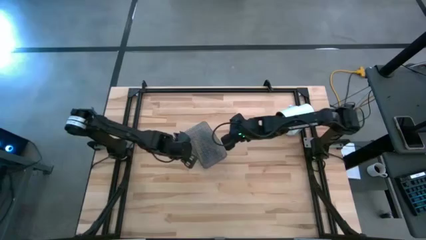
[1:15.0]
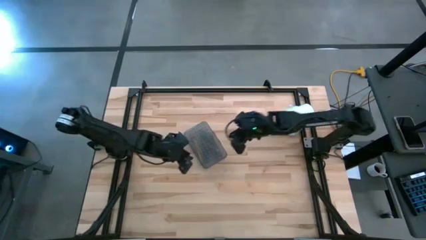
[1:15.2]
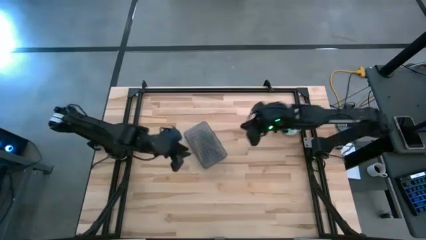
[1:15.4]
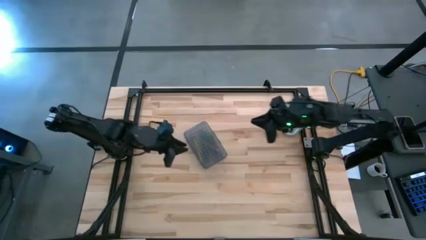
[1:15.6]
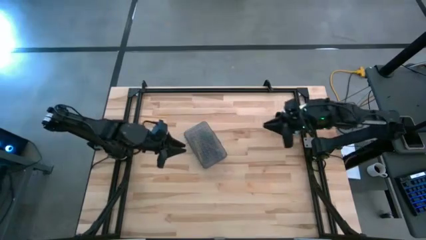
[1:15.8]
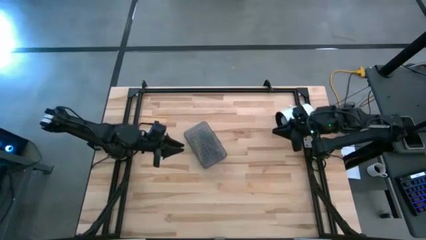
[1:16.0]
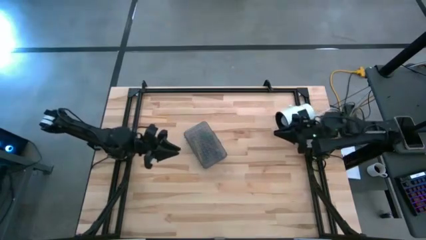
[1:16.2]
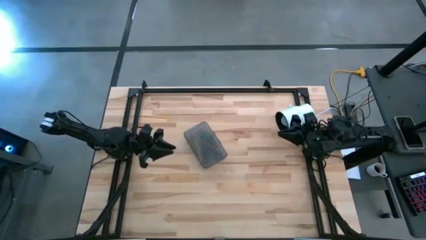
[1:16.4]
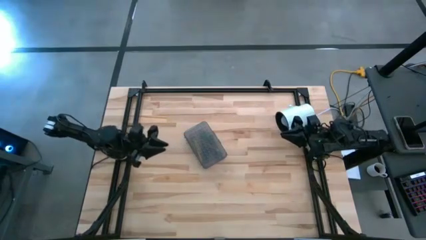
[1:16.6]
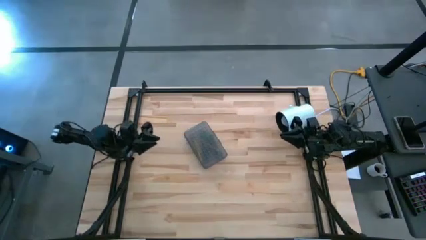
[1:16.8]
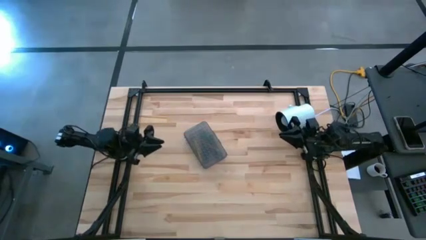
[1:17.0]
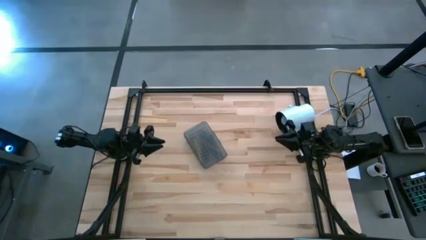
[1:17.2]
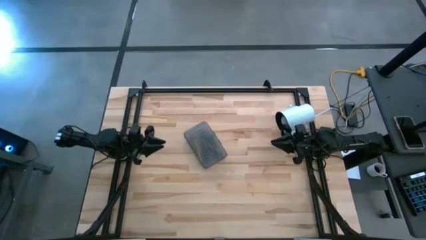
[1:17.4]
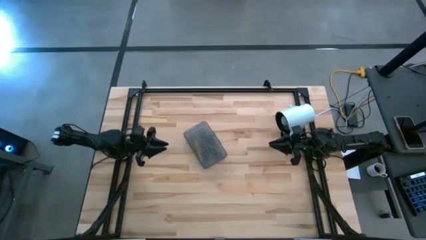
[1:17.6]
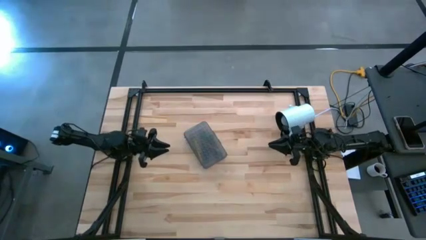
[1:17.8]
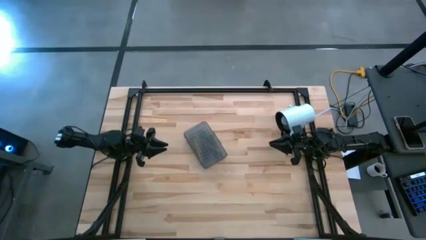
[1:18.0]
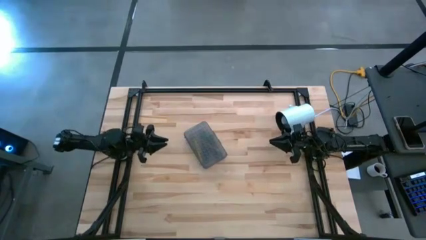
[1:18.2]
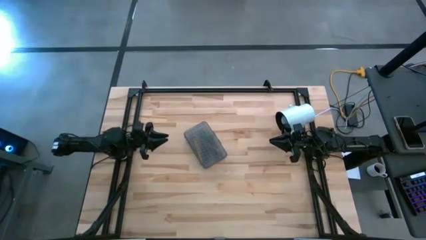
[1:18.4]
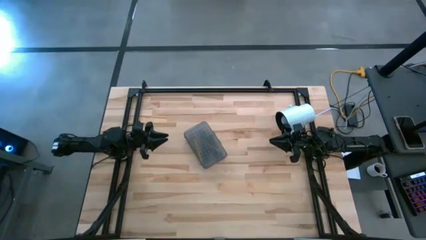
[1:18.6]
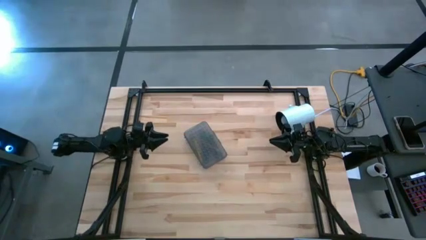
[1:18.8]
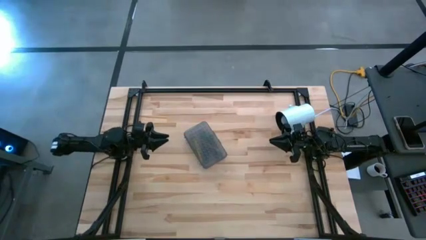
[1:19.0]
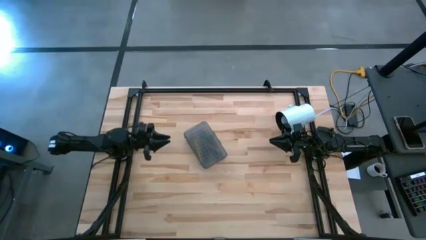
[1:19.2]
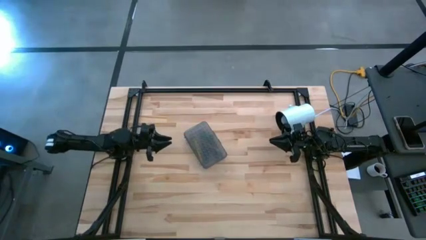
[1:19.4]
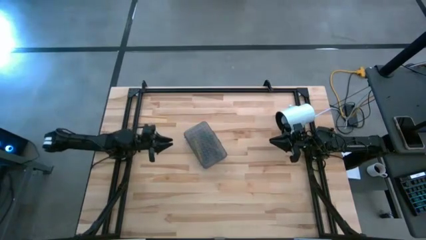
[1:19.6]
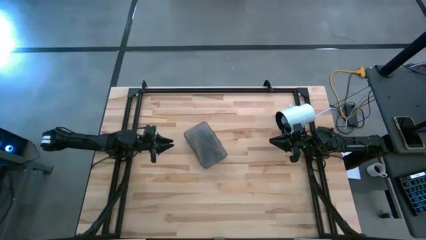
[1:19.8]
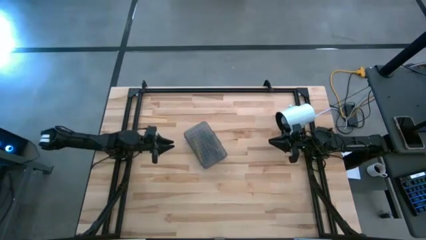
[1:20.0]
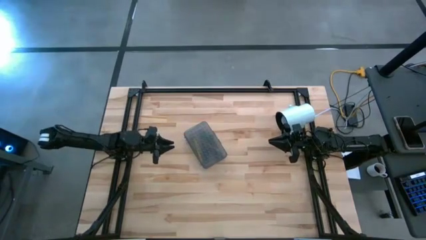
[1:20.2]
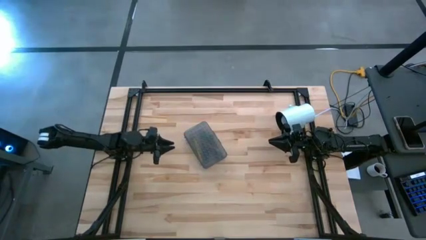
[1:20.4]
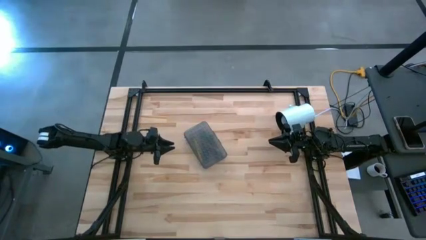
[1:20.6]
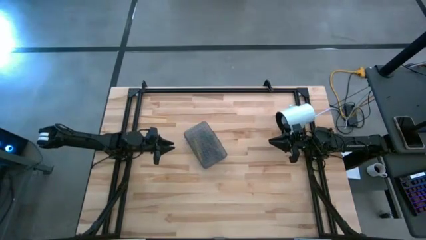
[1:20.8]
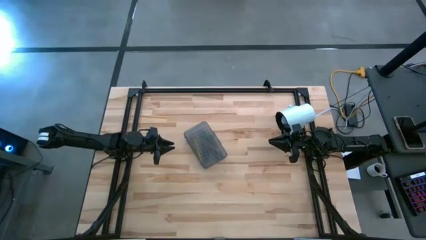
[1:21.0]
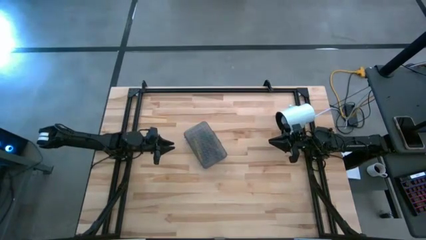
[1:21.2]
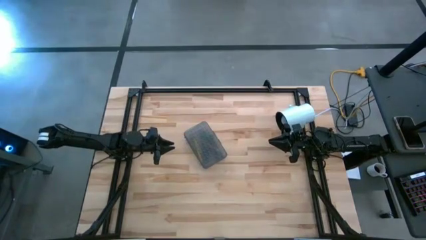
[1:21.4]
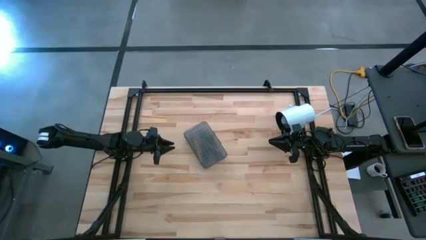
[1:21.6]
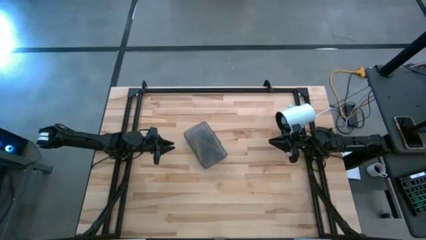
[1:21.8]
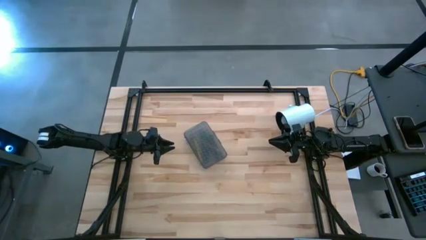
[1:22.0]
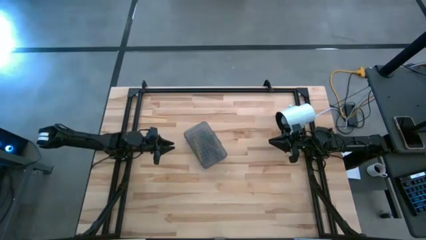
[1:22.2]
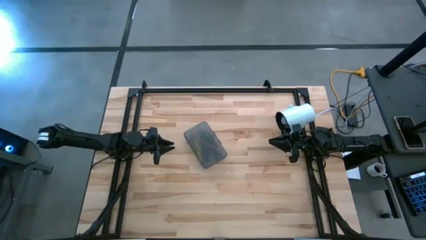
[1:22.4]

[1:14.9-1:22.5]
Task: Pick & place school supplies into a supply box
Return to Home Position

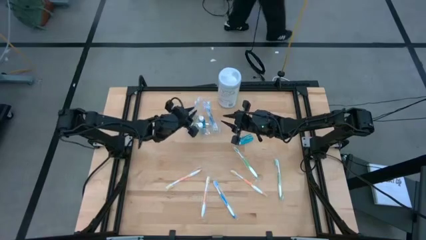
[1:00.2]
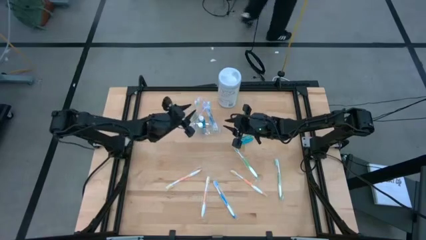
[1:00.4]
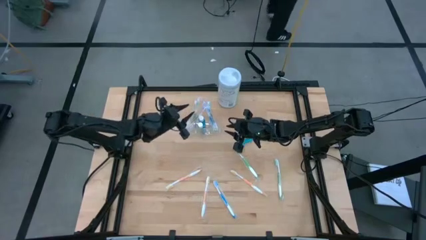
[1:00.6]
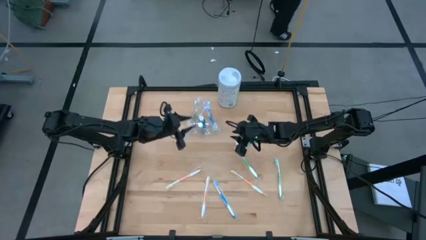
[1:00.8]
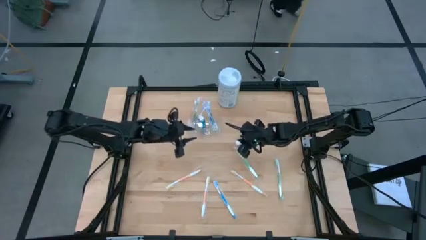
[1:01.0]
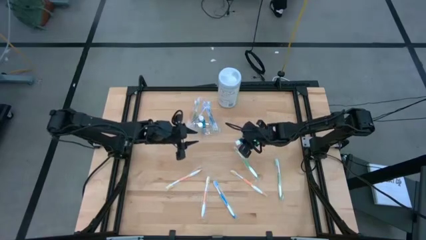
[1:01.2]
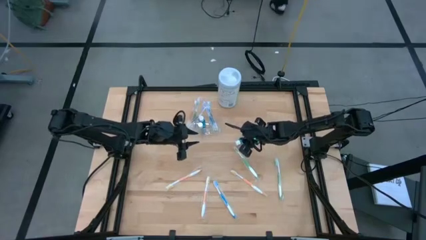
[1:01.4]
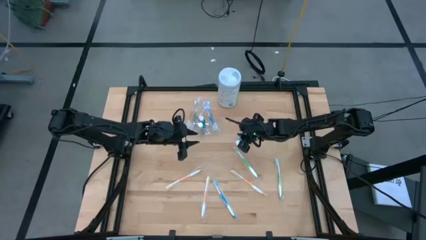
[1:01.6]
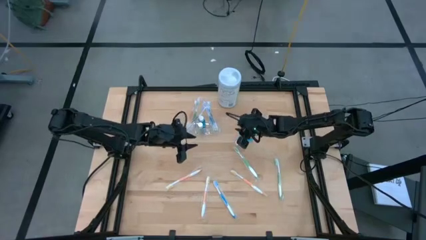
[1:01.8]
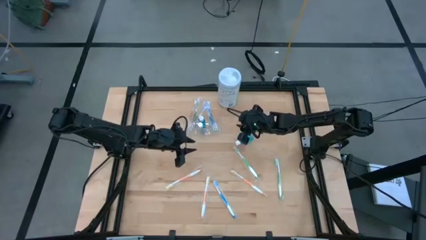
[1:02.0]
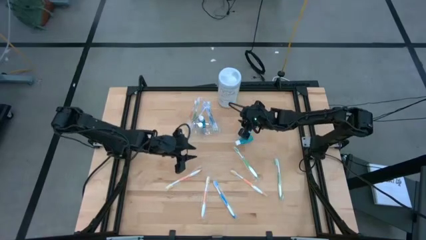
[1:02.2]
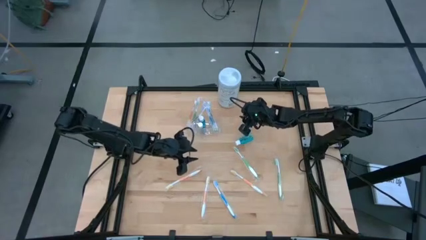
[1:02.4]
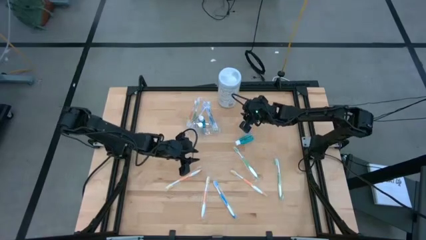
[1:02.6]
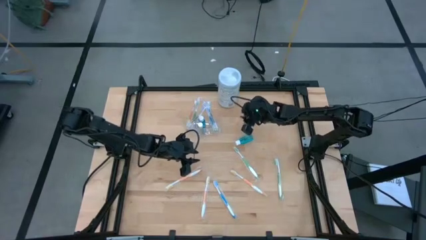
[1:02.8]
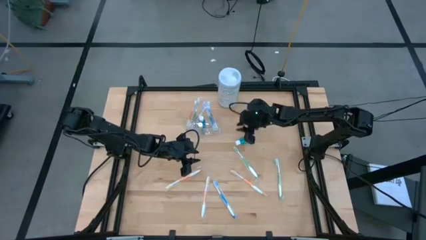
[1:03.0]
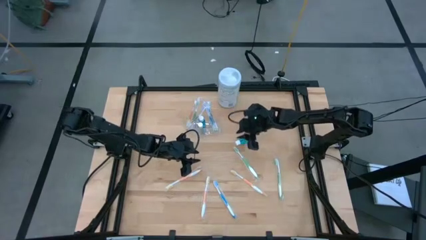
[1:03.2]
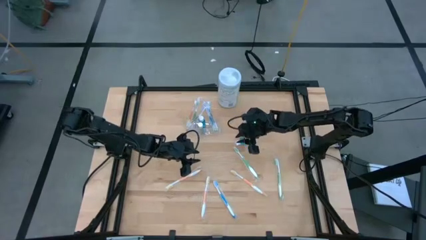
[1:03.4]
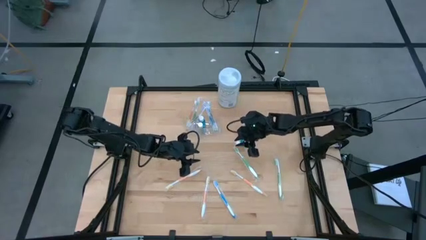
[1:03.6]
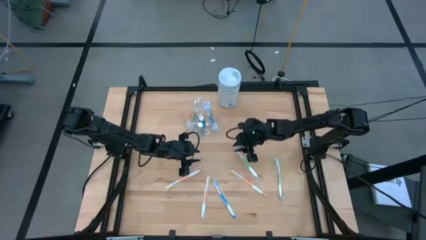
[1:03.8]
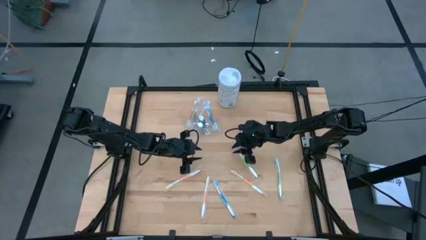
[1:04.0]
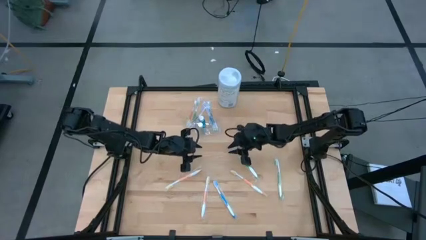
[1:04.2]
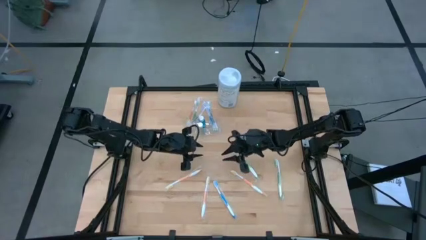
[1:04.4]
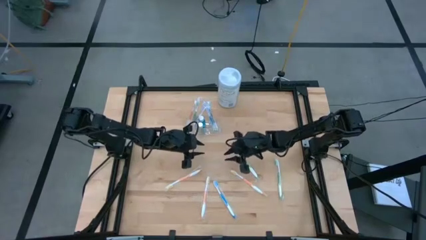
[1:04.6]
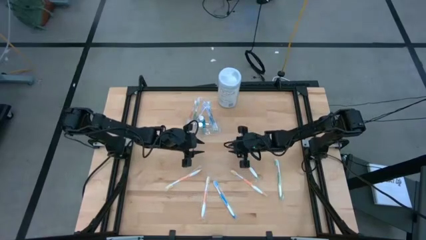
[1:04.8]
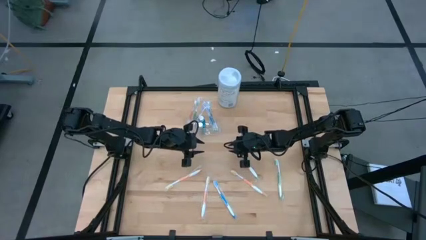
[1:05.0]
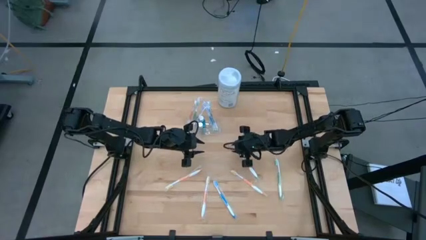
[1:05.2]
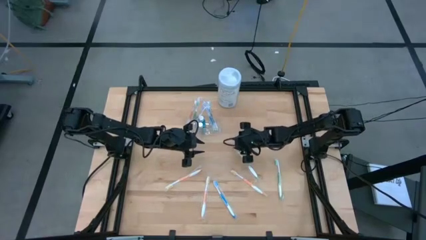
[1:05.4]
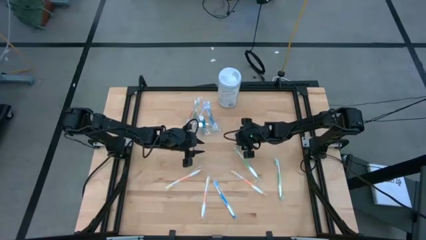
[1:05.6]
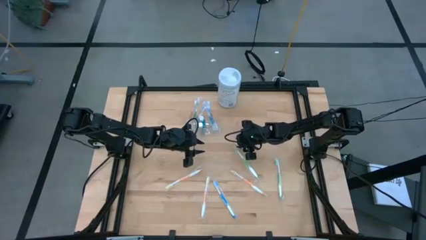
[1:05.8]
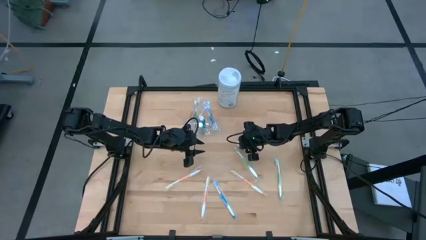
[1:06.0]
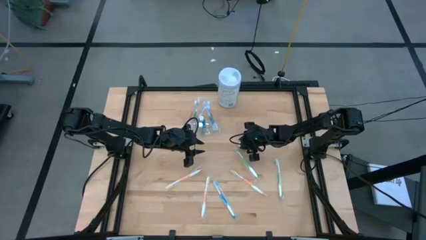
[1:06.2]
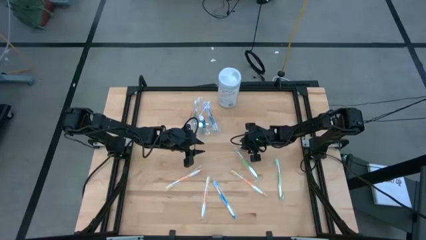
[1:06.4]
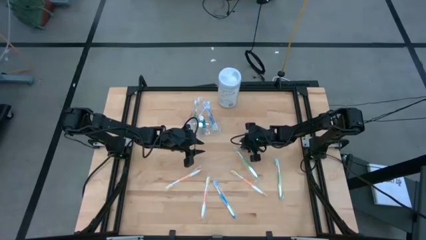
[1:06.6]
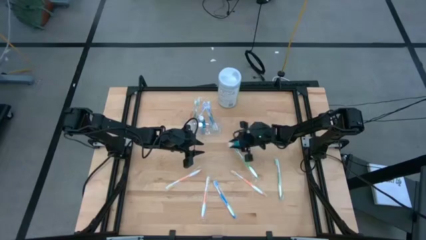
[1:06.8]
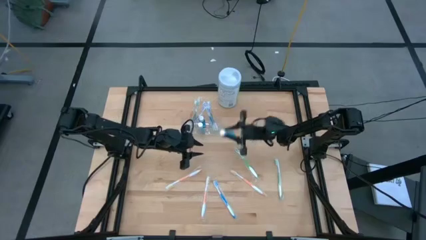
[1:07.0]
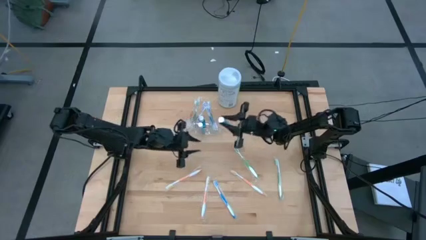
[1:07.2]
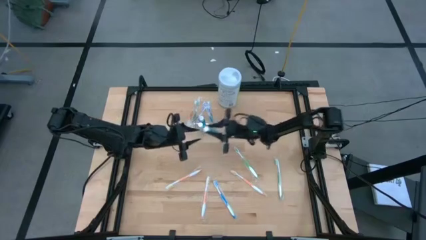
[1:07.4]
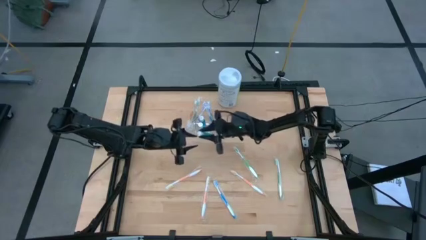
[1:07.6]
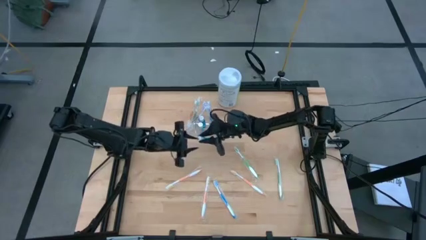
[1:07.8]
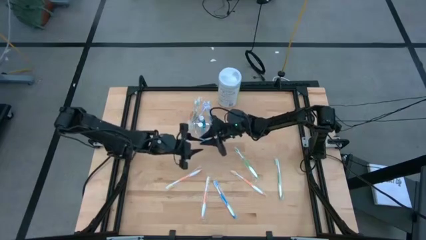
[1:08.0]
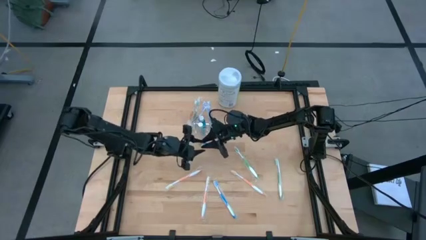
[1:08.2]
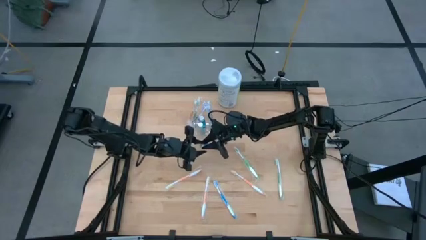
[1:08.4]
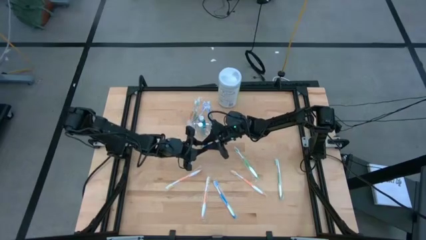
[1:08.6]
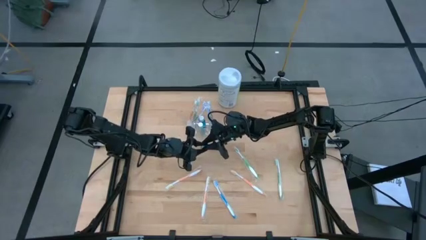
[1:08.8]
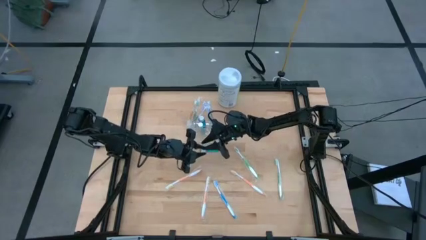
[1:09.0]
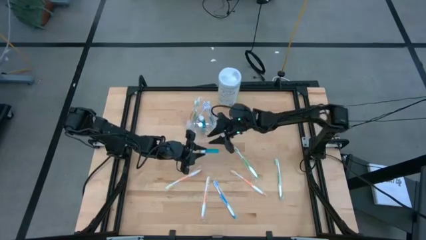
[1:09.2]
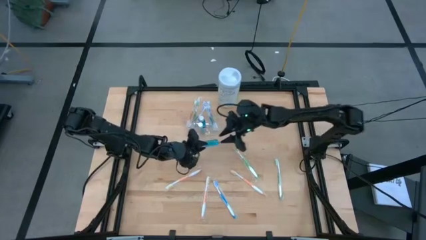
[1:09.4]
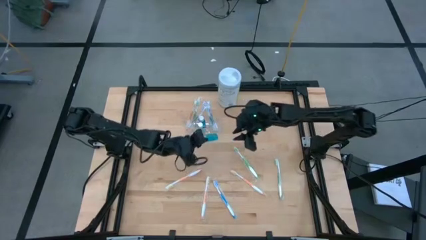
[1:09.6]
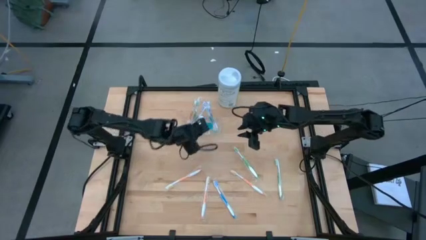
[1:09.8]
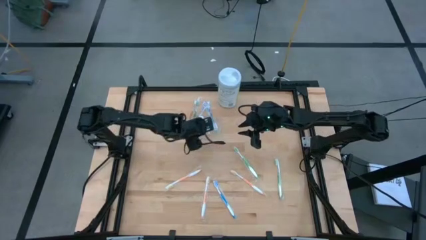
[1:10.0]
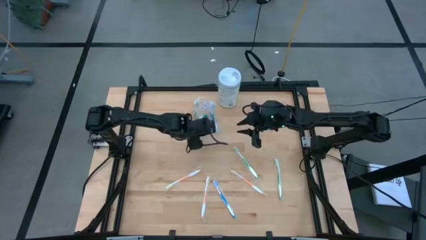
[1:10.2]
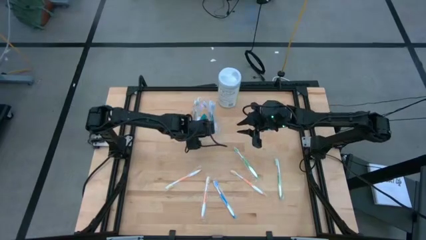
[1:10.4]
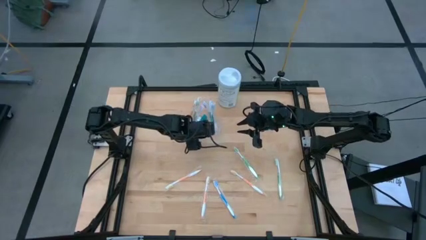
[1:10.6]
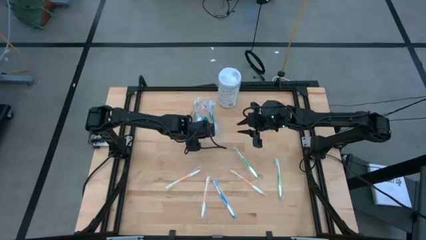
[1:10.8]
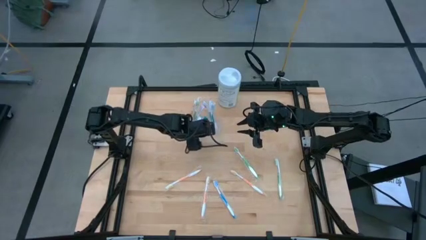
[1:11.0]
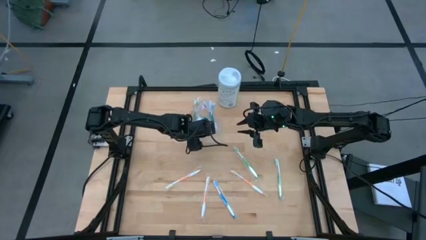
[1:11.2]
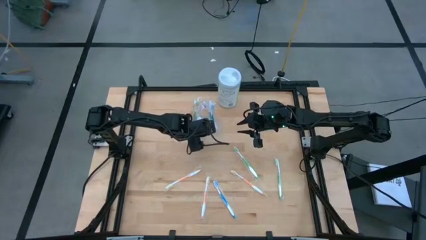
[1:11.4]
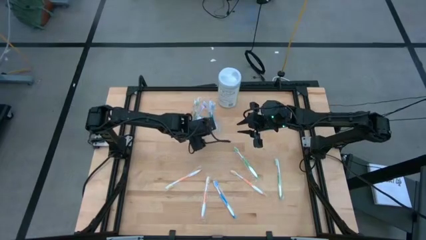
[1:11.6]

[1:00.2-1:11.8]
Task: Pick & Place toothbrushing station
Put the blue mouthwash into the transparent organizer
